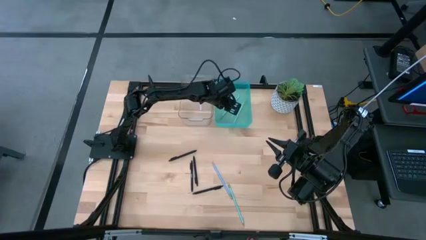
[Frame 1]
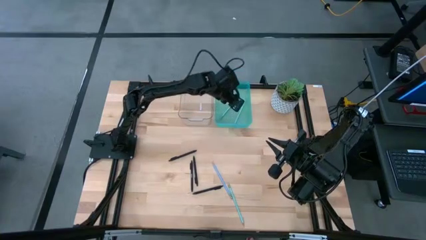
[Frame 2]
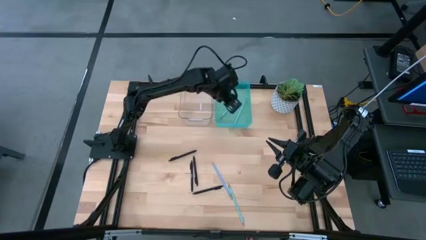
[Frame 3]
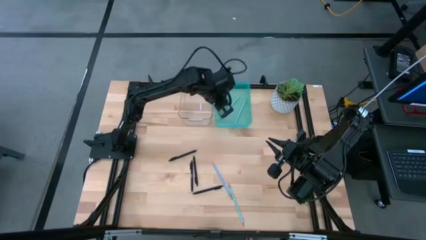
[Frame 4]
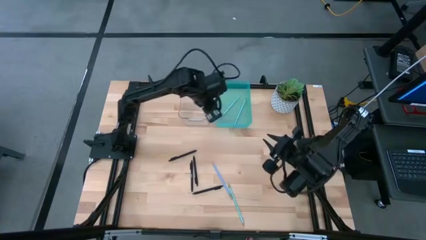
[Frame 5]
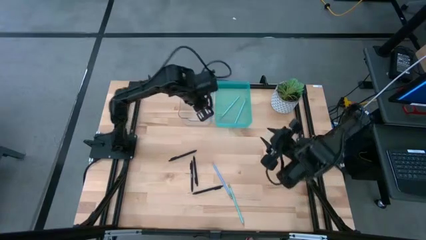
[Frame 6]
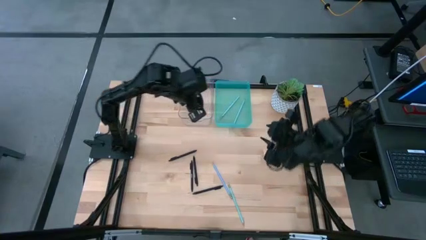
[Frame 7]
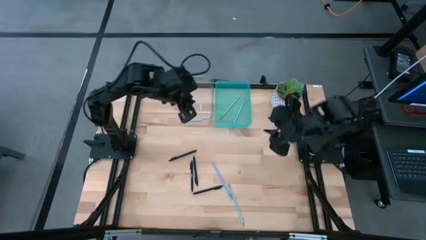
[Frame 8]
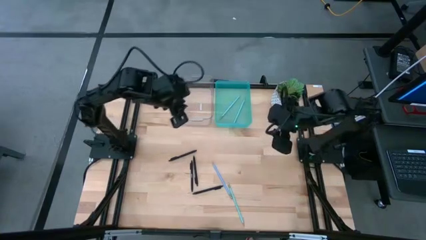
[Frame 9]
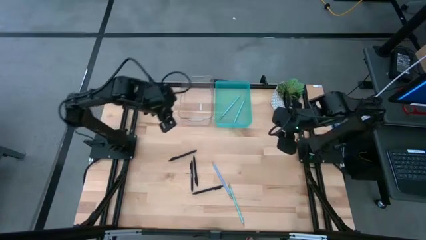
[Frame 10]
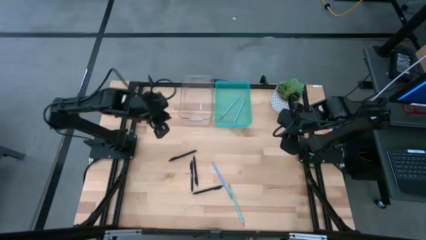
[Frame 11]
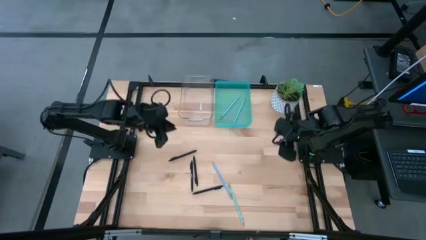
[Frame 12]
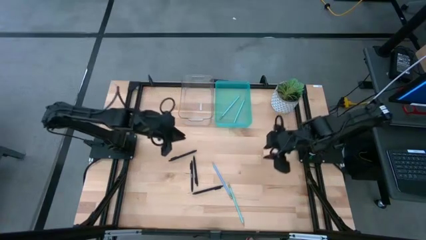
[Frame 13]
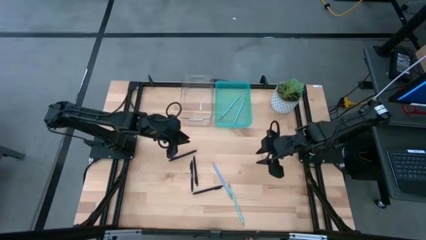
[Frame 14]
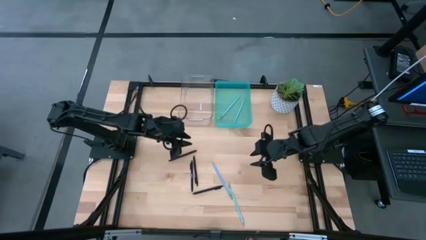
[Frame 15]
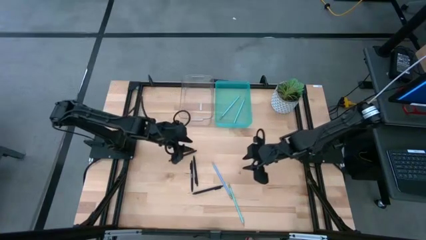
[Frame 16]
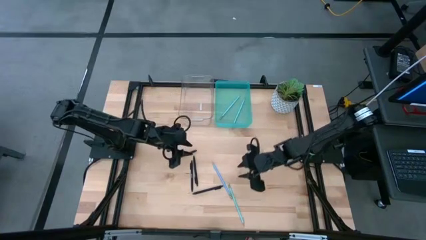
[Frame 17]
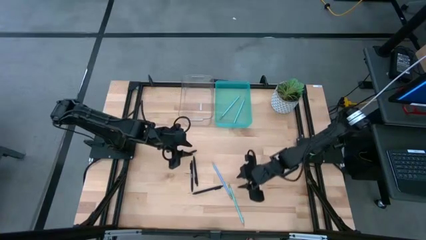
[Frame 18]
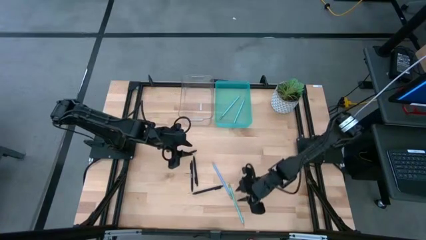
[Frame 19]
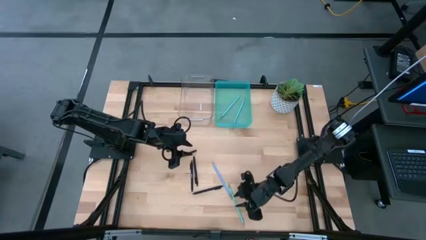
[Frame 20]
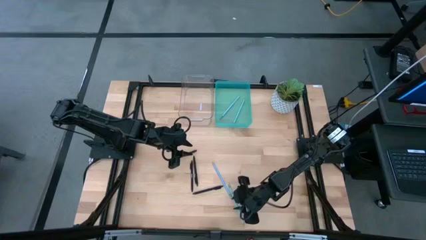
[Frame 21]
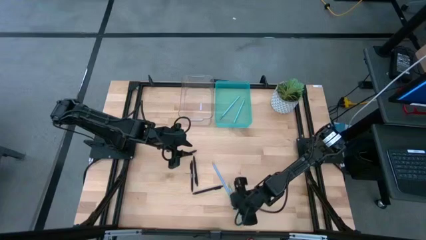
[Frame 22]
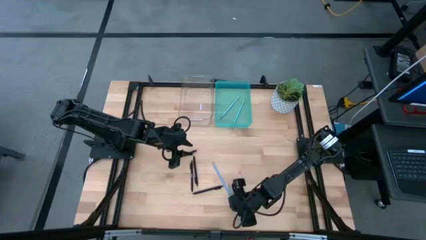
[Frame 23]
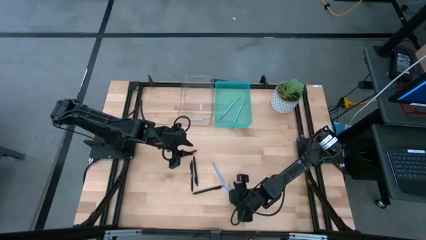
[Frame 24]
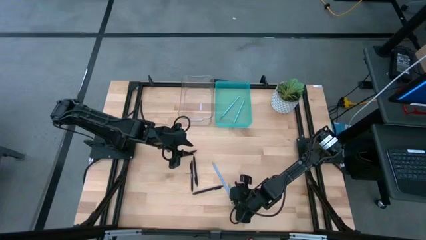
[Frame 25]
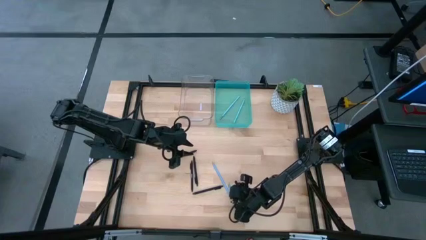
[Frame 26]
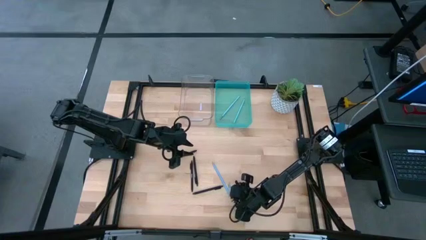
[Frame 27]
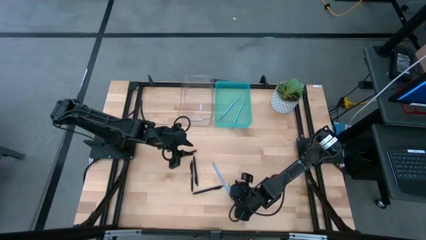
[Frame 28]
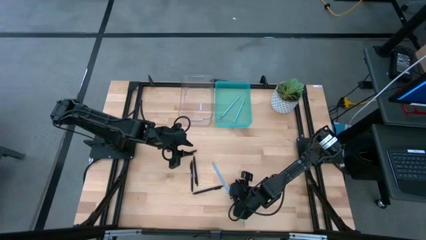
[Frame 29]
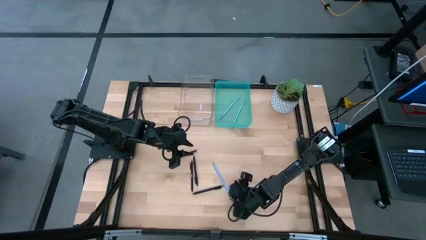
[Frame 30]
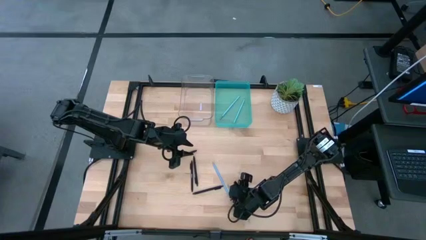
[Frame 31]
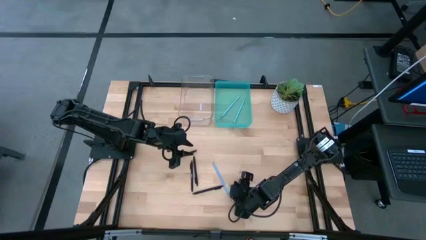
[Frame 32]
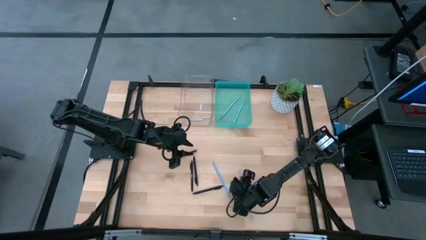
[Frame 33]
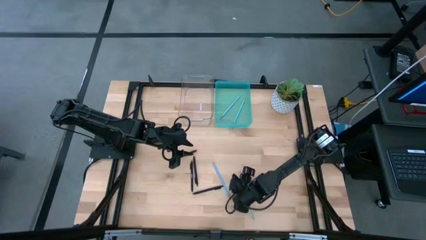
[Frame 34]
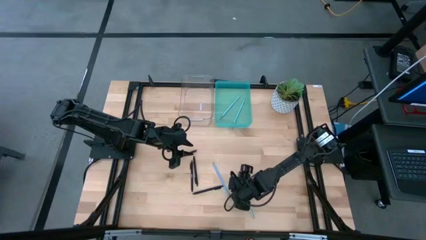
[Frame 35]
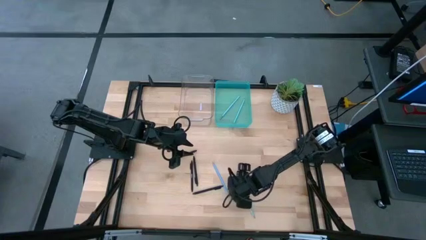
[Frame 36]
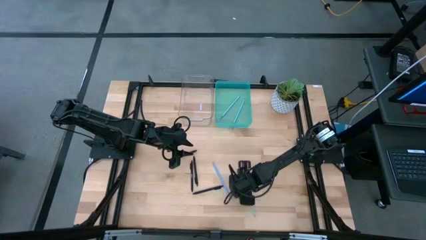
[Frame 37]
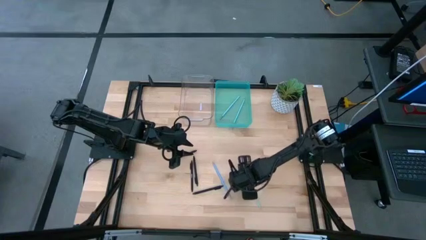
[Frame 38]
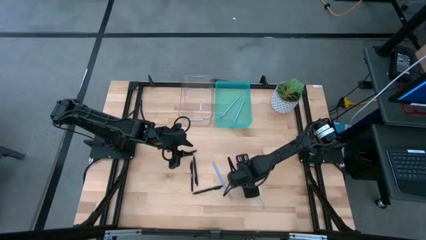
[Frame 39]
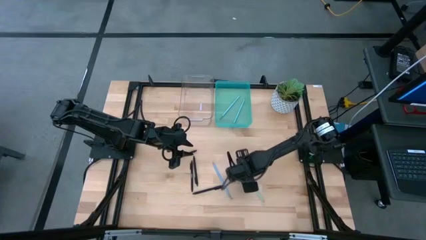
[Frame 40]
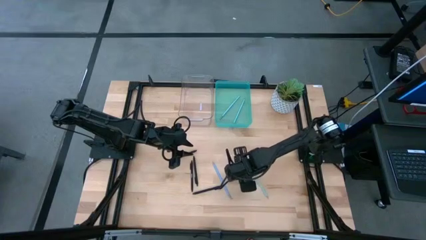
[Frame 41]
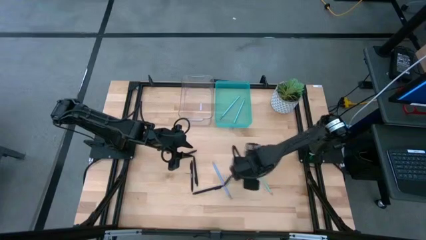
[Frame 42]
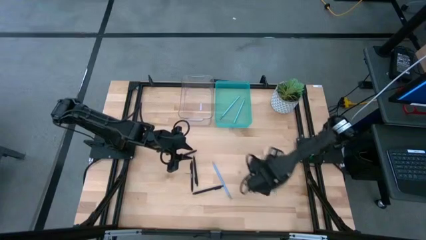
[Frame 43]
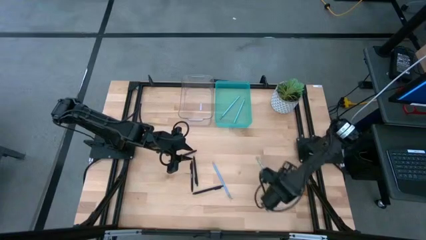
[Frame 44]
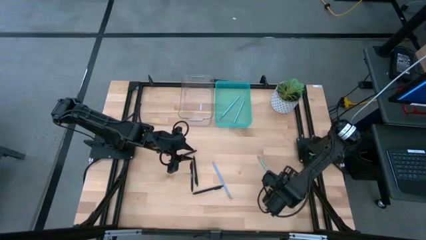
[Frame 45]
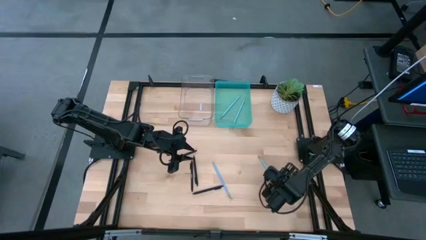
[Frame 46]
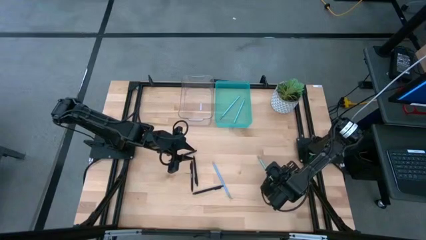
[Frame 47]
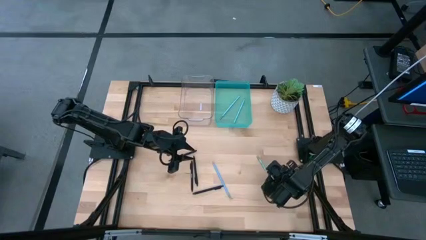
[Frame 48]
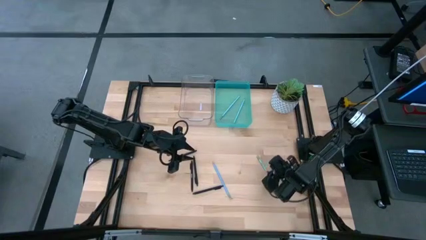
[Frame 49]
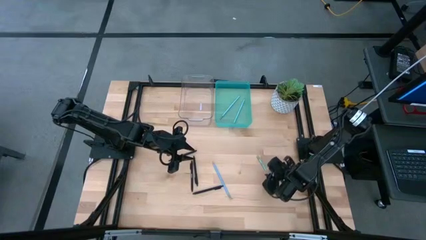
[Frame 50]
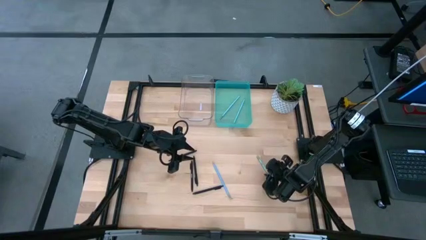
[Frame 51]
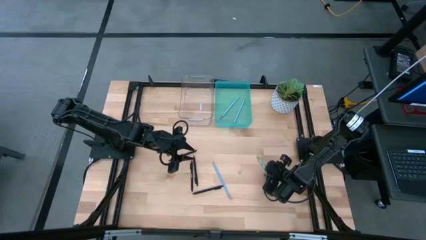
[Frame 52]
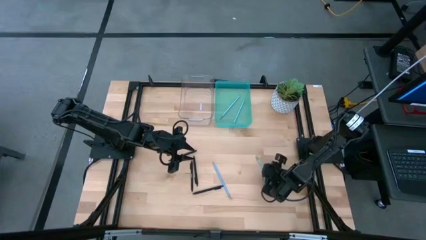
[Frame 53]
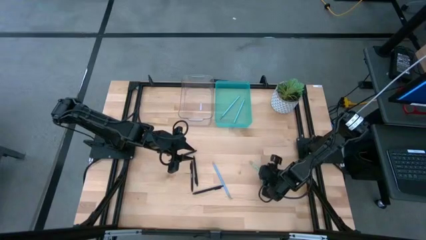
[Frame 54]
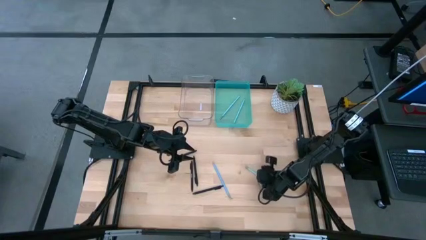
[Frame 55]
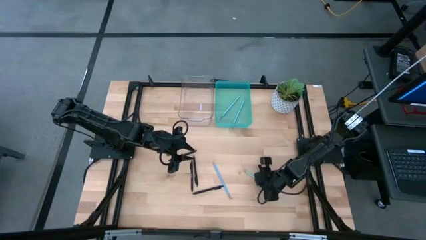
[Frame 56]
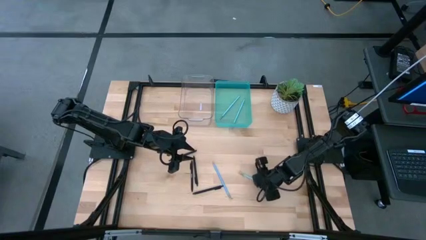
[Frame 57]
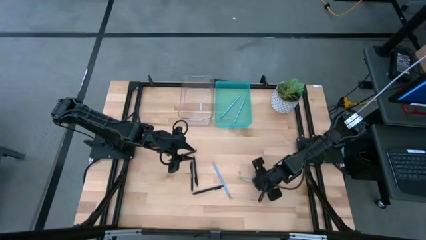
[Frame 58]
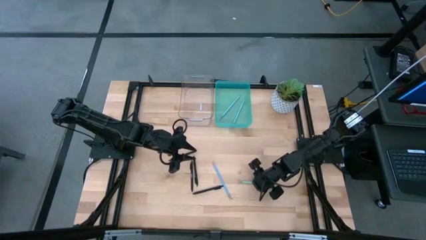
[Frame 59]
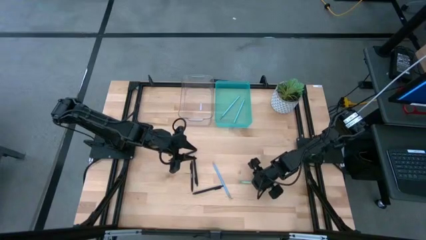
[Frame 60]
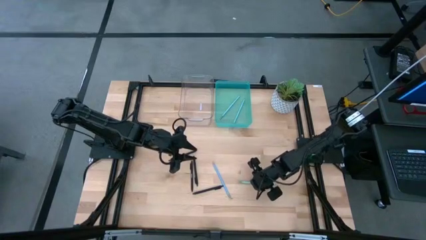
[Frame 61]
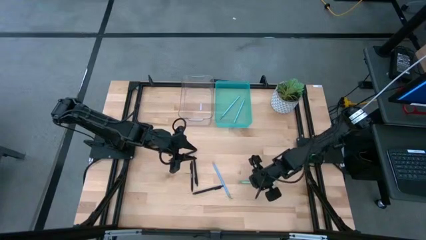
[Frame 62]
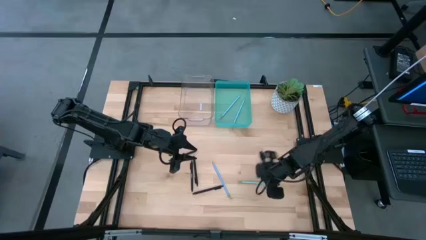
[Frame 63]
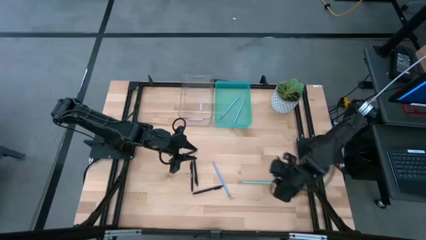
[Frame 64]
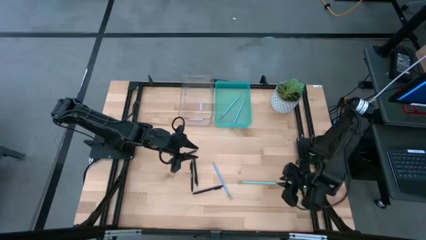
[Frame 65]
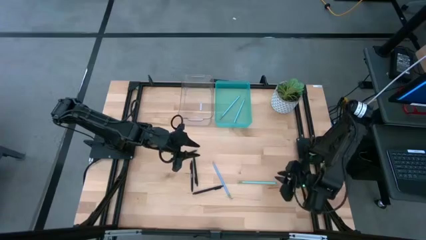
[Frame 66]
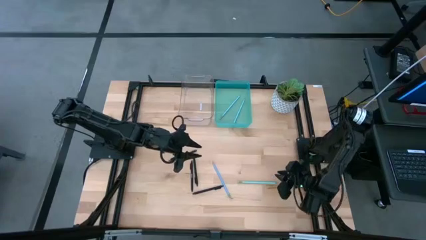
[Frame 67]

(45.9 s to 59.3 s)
Task: Sort pens & pencils
Put the light blue pencil into the light blue bin
